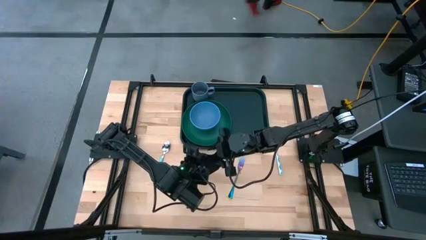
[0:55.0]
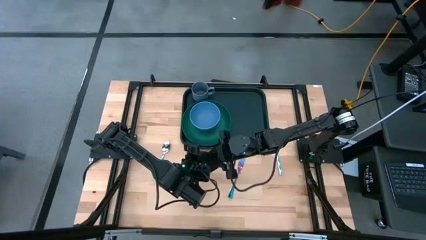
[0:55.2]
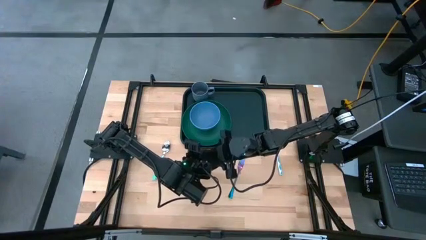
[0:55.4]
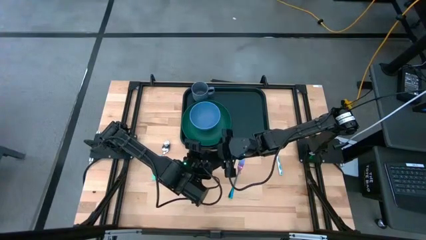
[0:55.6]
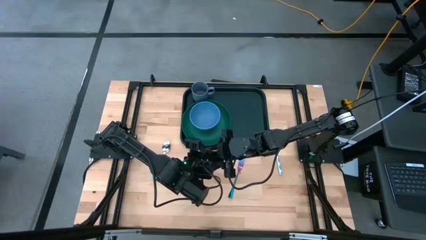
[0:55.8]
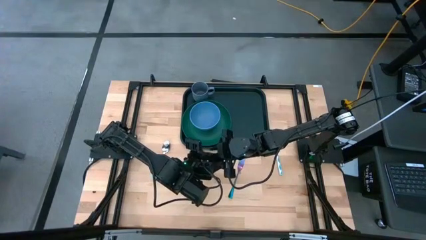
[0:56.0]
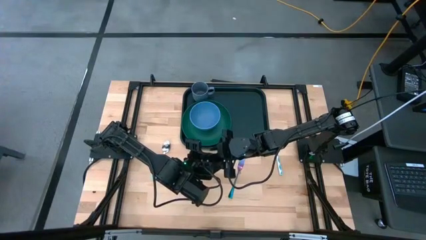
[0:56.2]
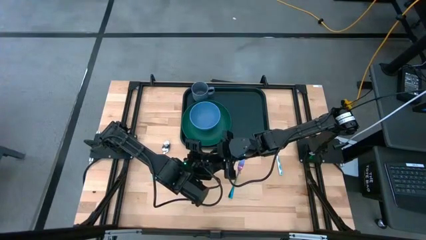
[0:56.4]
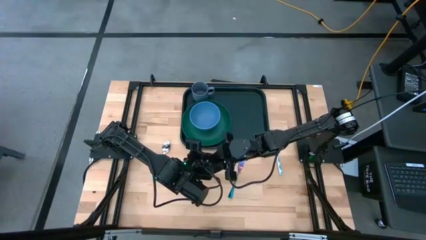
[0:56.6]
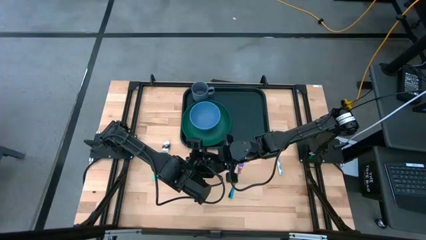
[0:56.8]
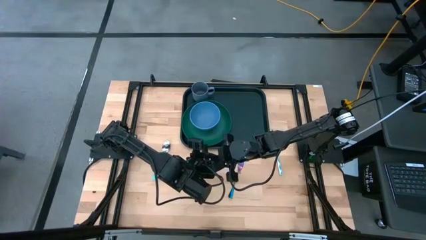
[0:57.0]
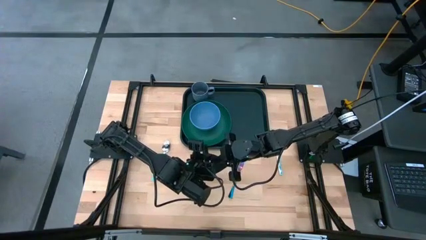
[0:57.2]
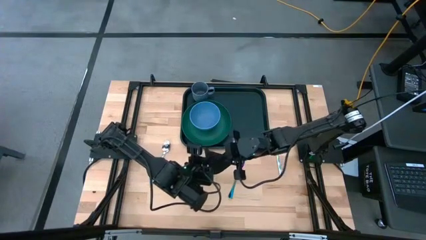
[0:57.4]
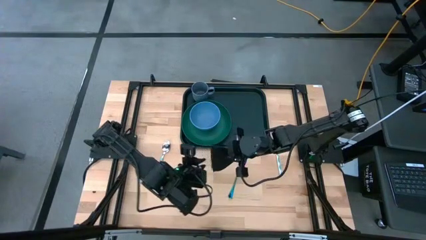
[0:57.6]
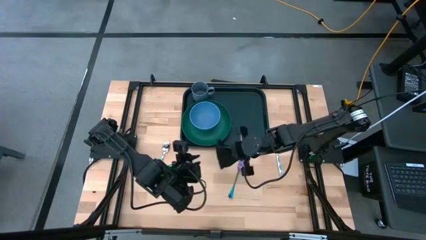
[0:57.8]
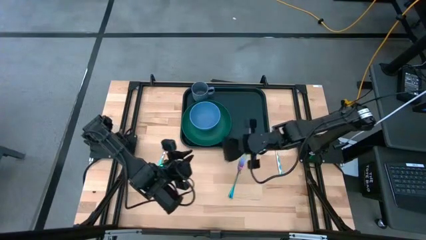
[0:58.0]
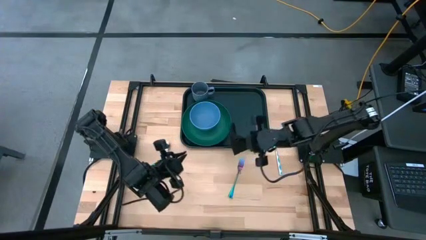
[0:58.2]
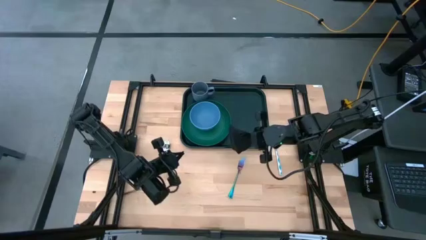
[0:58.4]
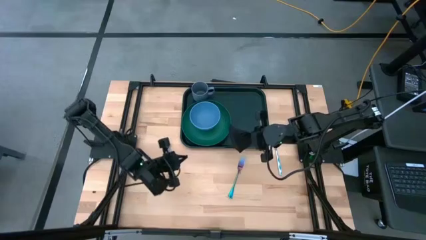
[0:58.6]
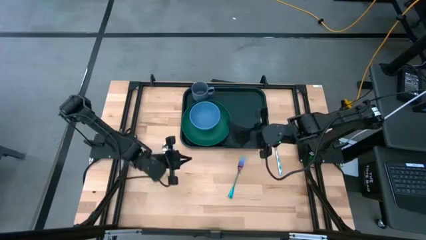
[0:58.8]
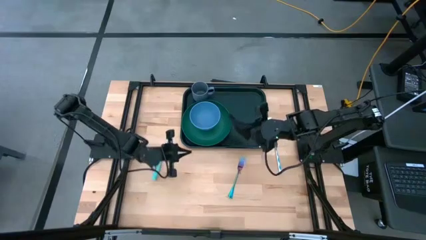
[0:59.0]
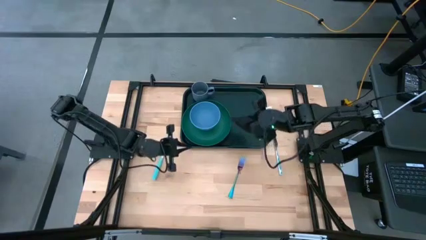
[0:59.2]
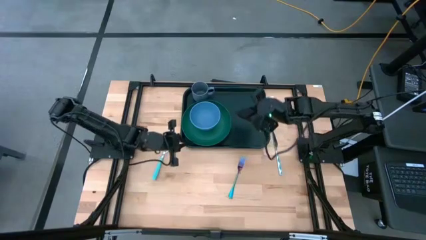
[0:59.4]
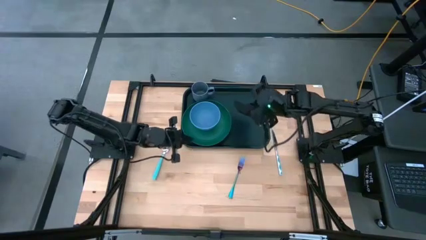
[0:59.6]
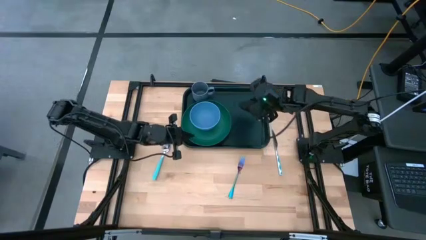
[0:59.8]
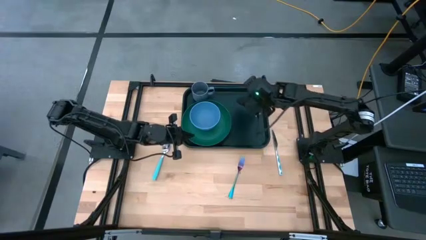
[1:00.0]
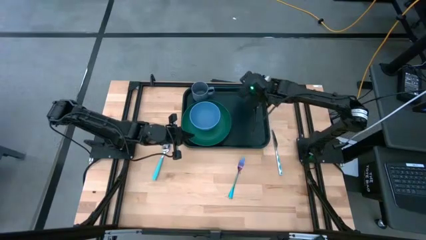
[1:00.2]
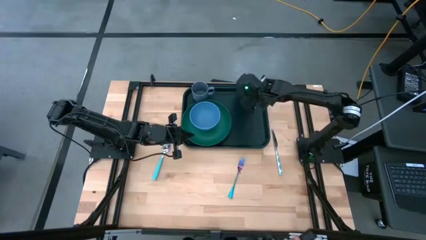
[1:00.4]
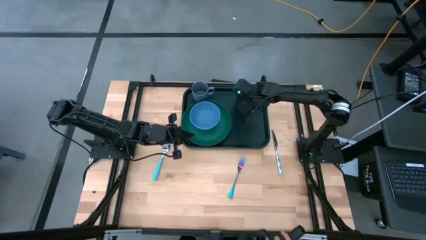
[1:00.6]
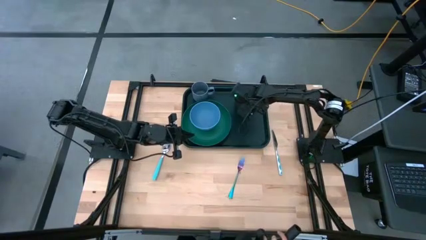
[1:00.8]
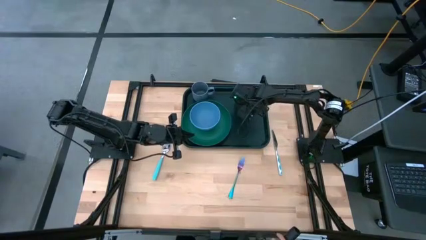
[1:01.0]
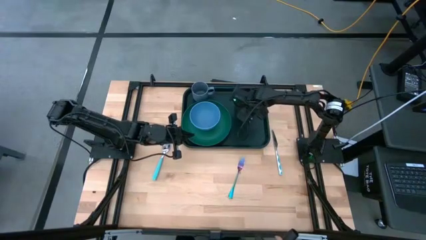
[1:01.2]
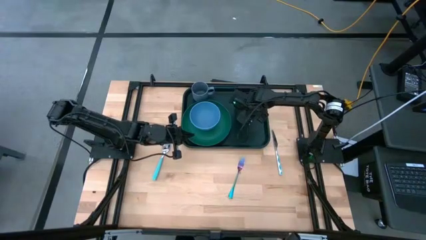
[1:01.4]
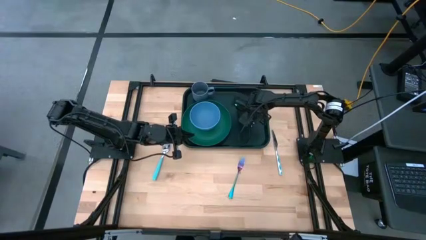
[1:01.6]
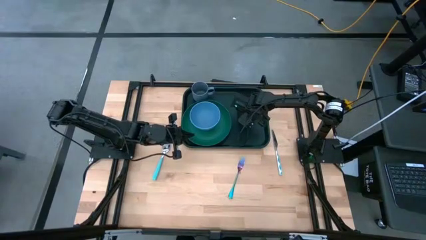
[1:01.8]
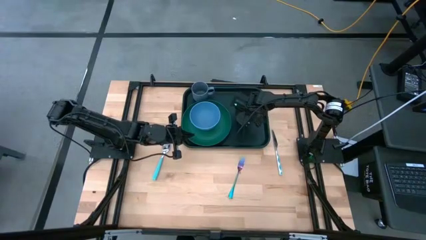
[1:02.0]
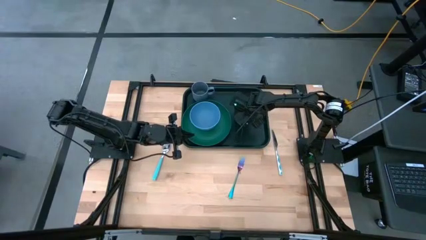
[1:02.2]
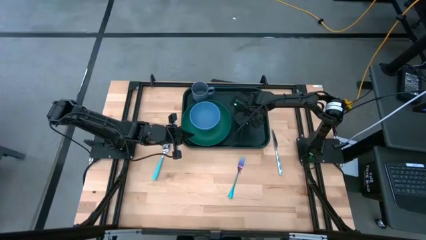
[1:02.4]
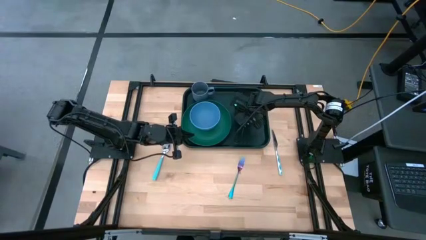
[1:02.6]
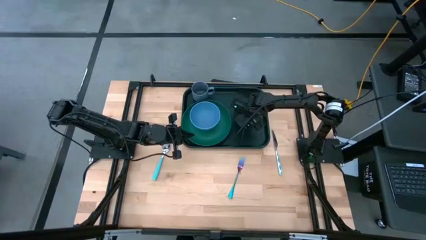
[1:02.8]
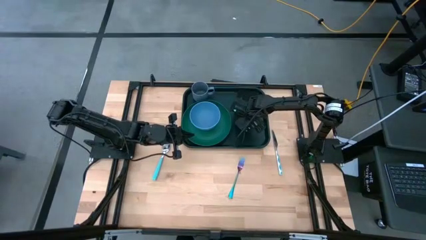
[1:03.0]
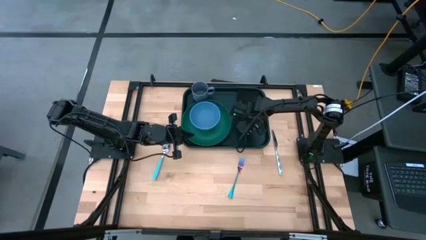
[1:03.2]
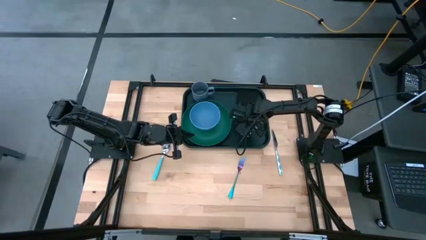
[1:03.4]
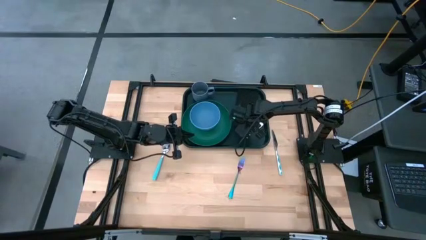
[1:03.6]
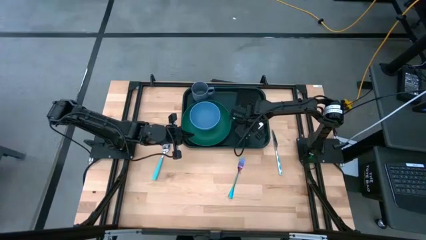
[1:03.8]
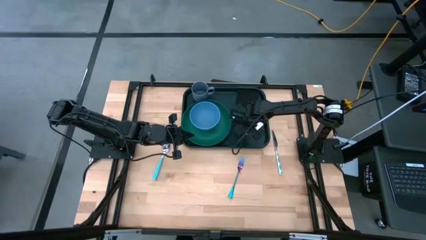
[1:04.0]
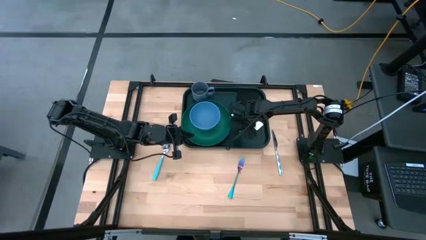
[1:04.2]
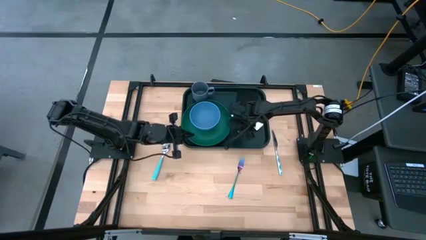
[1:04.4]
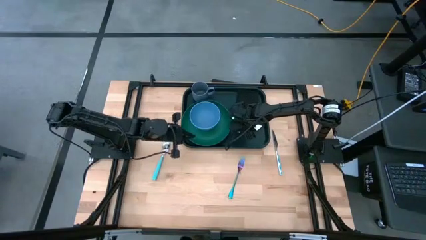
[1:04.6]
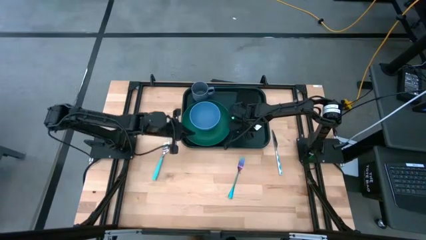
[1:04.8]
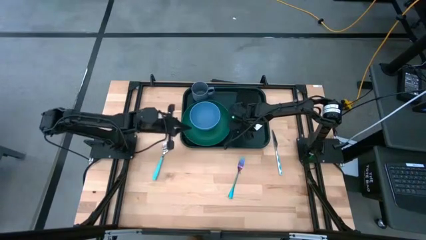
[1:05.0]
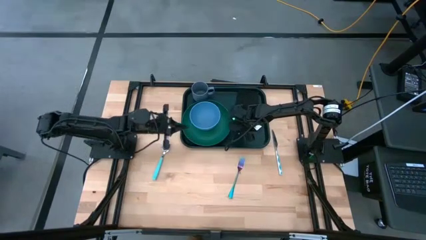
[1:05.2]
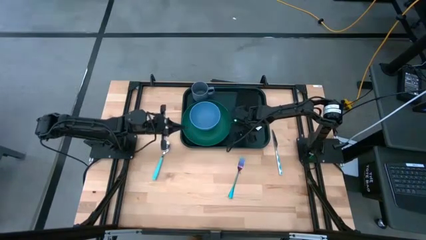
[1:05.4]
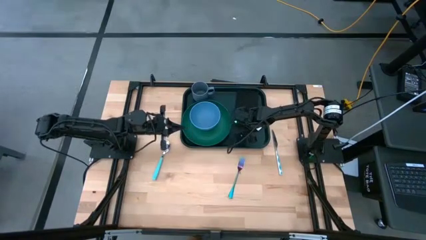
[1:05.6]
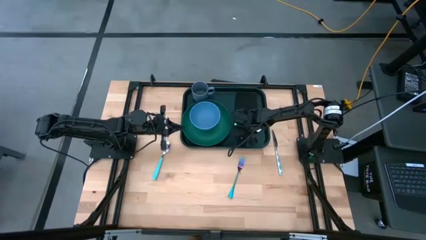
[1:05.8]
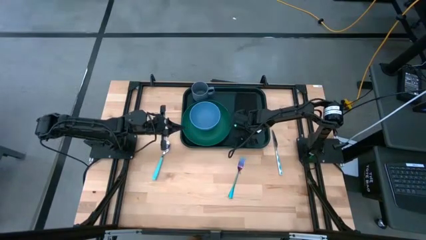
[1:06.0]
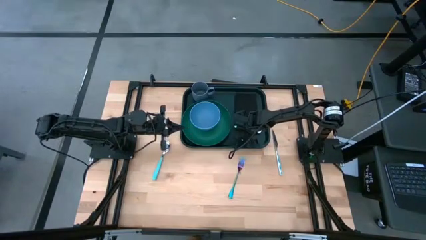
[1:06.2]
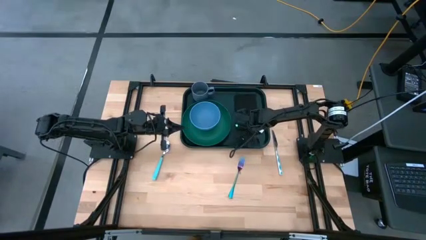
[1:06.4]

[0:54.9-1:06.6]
Task: Set up tray
Put the black napkin to the right of the green plate on the dark green tray
